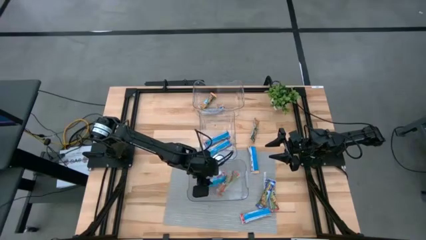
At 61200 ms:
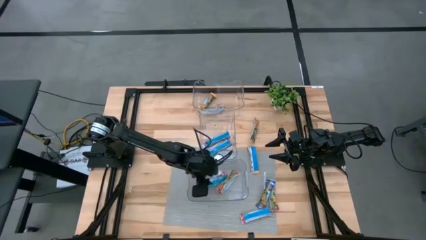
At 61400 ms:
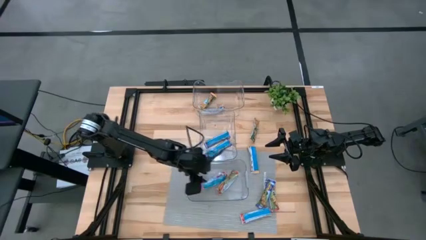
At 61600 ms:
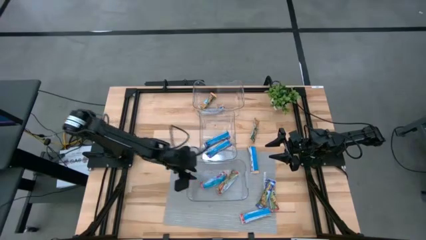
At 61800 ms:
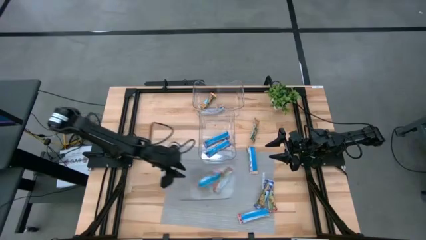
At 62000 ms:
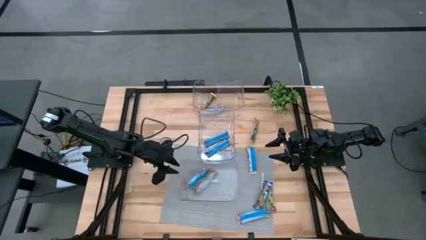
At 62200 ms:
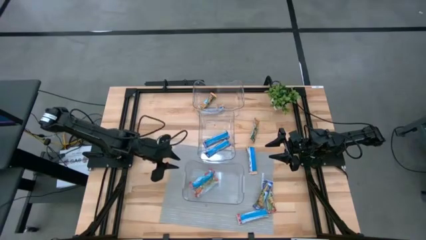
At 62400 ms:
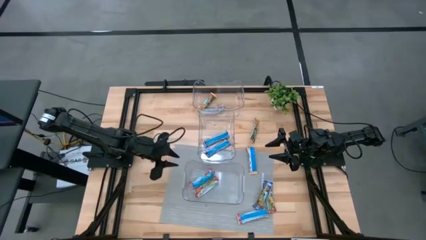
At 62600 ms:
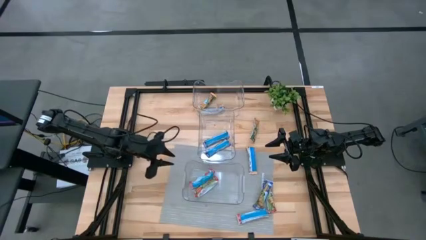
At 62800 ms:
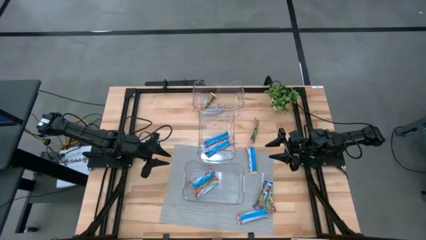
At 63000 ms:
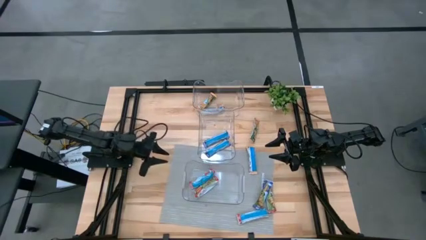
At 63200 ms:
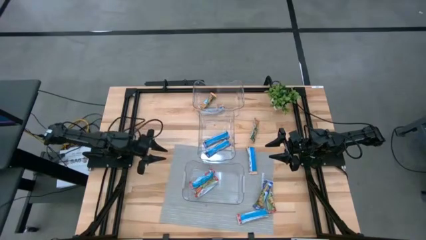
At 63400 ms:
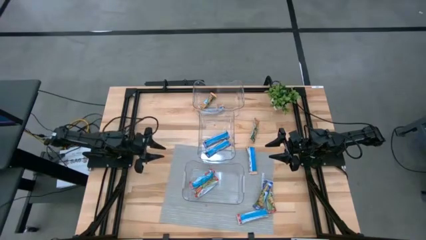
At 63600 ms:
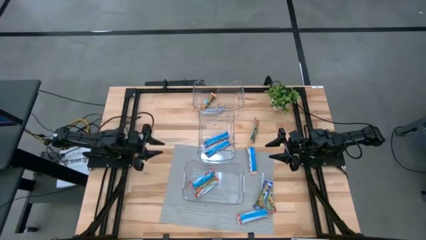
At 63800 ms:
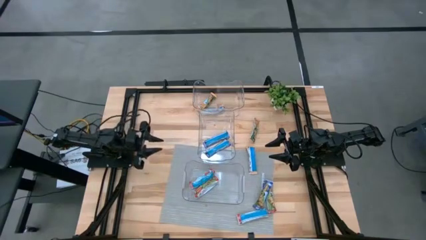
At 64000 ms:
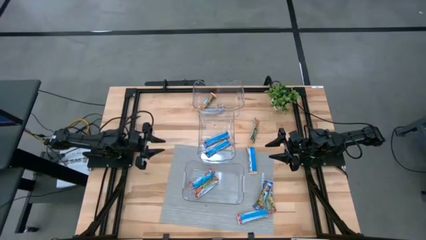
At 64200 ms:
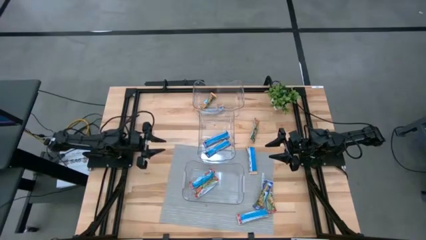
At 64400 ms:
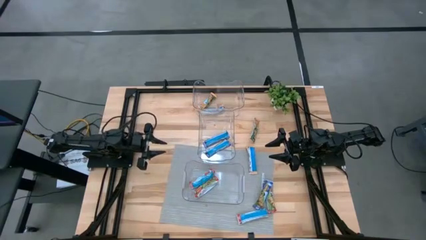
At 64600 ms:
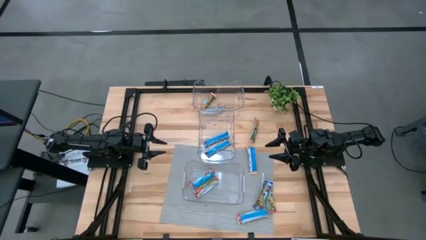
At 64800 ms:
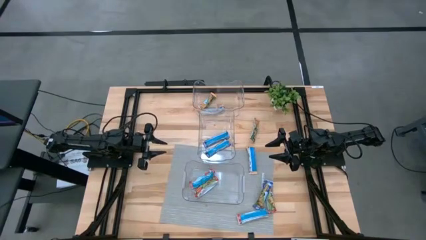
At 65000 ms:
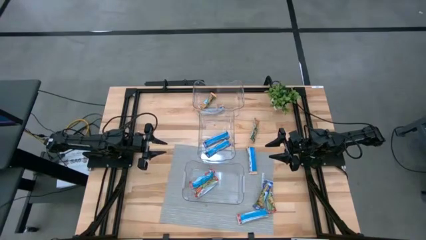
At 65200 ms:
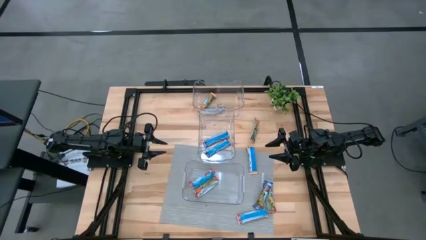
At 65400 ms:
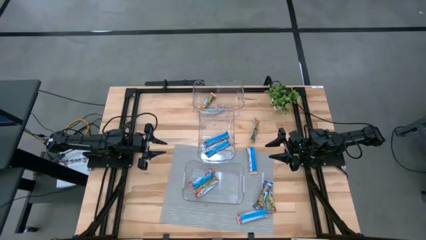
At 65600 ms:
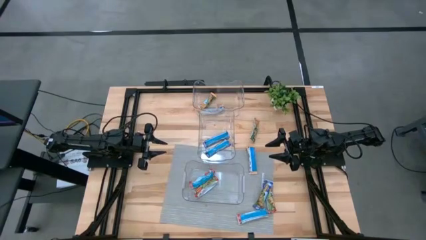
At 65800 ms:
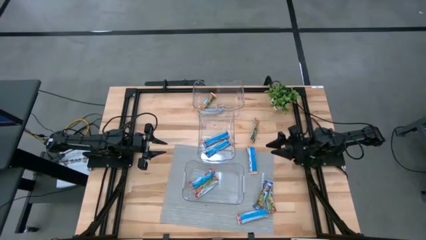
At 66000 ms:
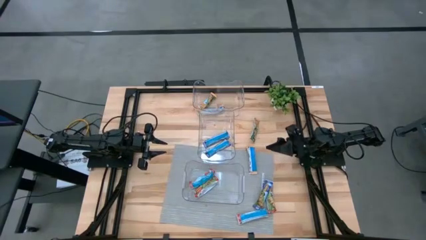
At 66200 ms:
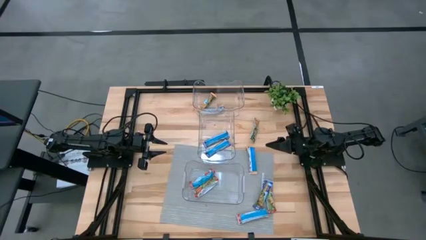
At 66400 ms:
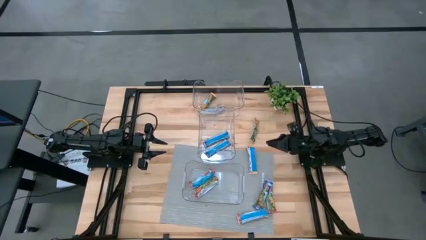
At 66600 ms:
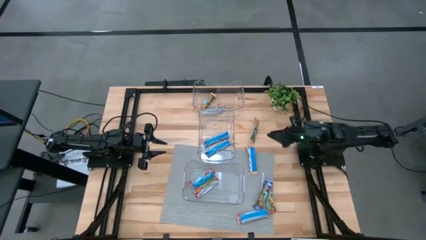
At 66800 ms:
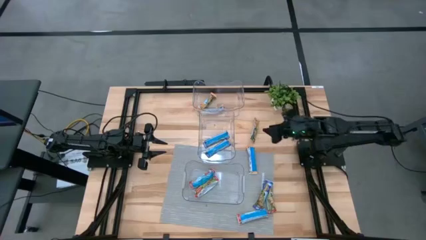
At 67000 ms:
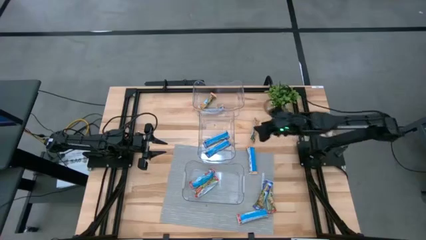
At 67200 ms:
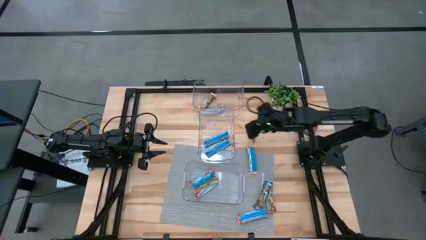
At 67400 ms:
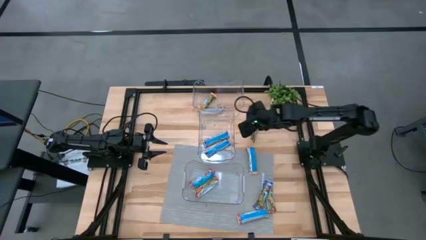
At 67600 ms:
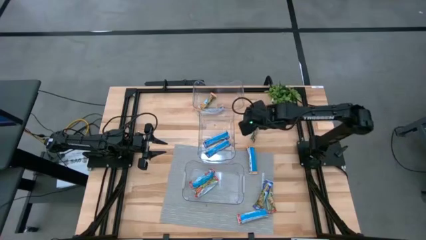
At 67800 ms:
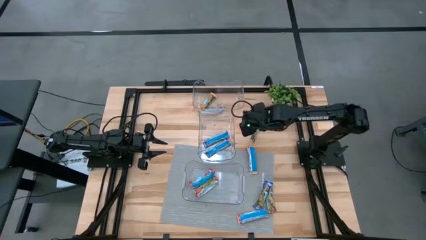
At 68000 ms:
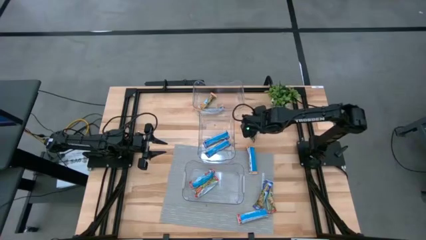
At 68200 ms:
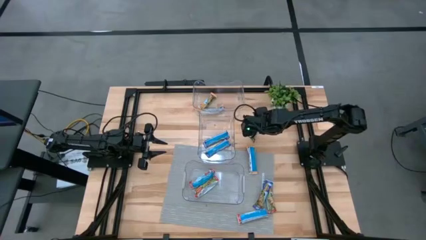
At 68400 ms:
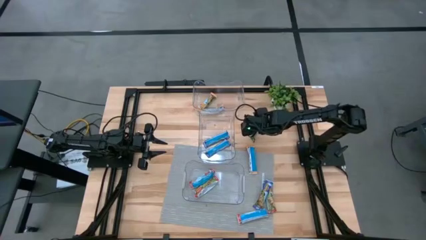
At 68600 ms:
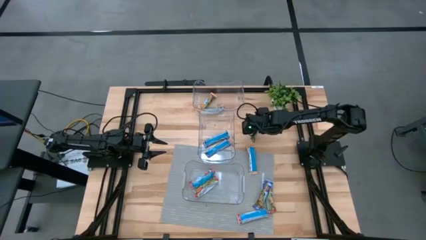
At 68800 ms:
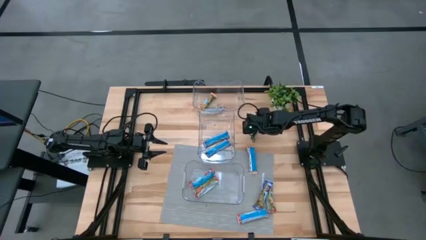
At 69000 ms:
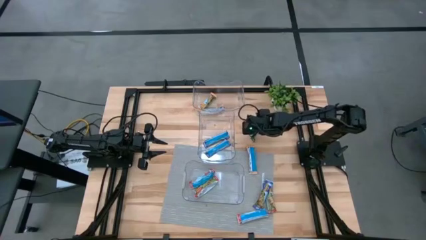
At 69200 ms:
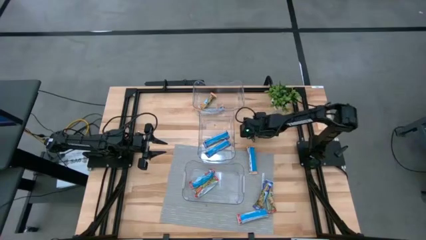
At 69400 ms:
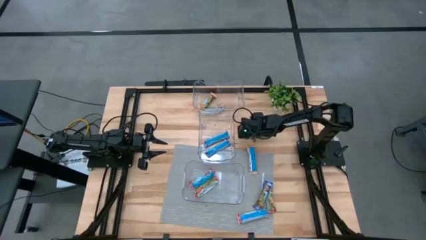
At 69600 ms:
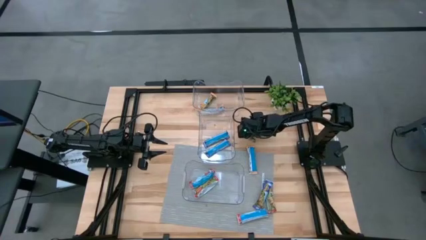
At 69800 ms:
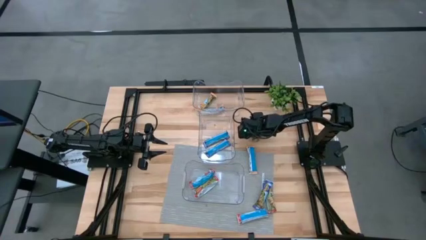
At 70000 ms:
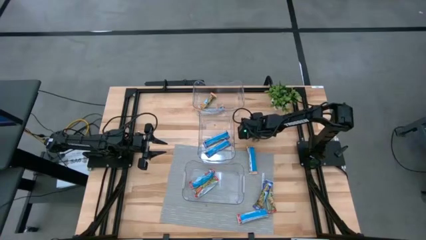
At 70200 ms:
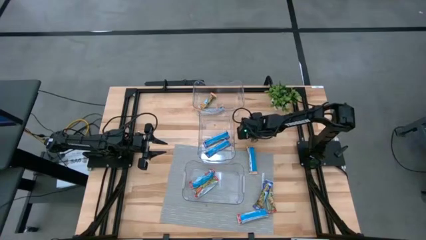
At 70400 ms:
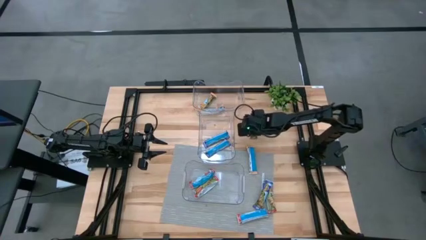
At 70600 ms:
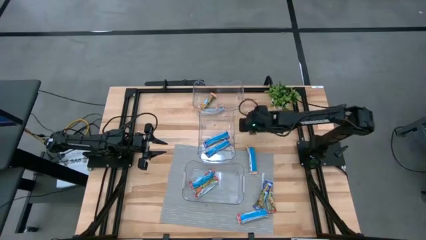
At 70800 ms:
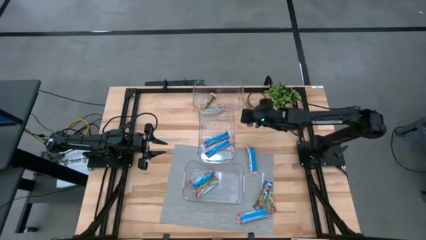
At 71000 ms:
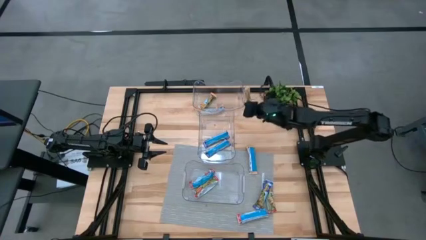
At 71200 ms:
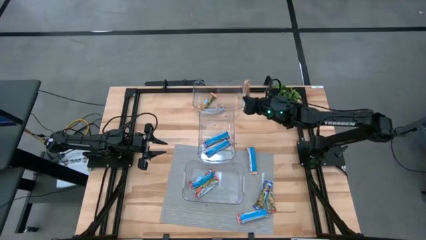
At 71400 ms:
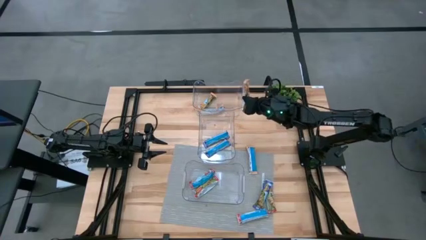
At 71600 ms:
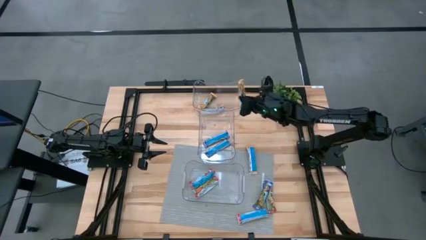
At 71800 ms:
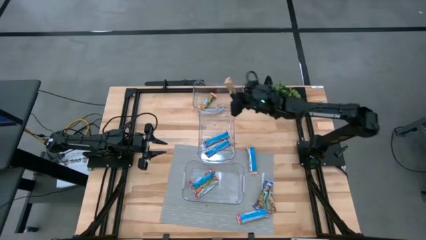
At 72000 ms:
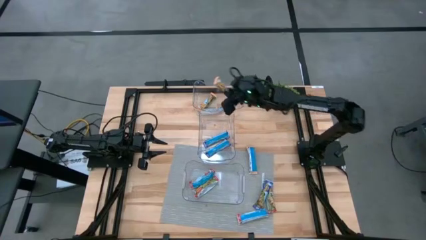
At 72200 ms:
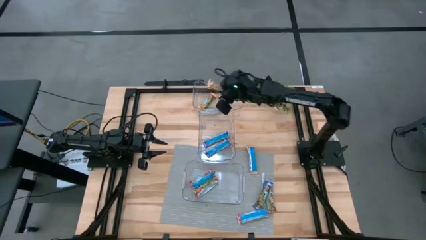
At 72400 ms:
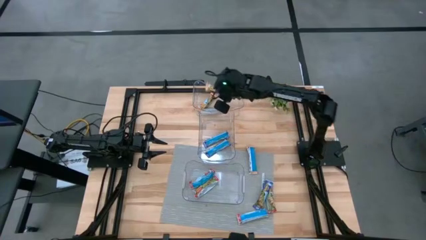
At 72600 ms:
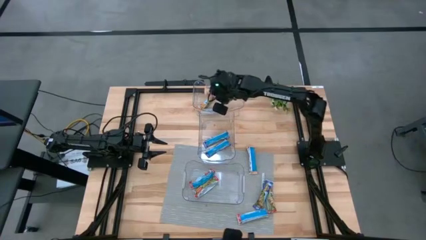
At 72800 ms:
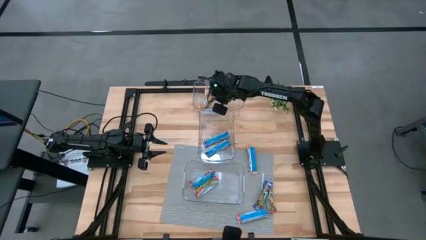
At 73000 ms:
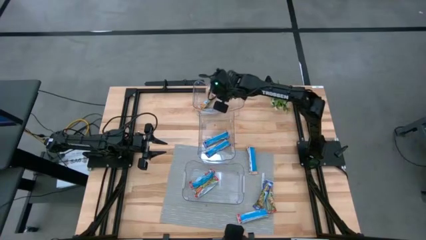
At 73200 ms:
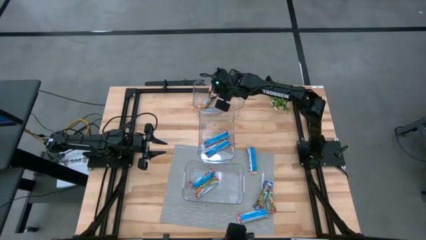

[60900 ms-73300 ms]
Task: Pick and place Granola Bars by type
Put the yellow granola bar into the top transparent bin

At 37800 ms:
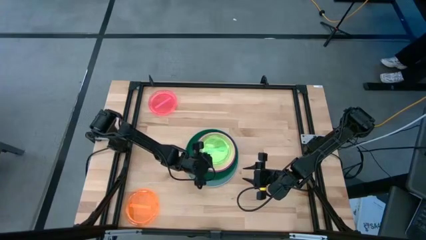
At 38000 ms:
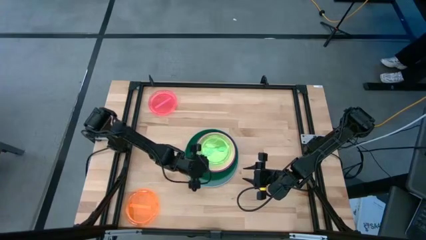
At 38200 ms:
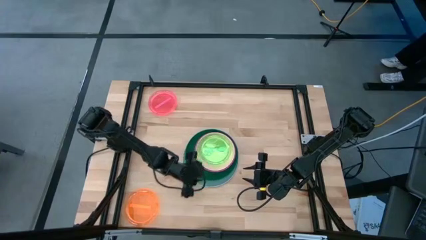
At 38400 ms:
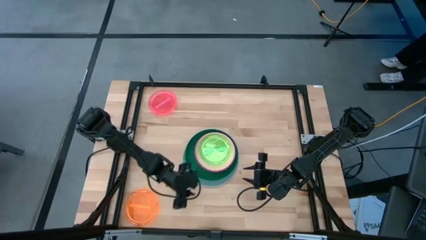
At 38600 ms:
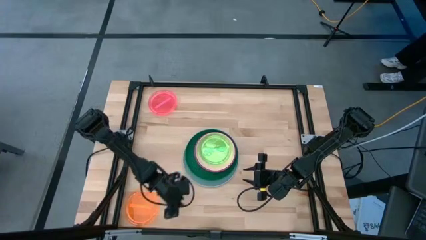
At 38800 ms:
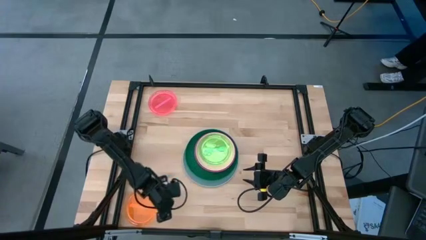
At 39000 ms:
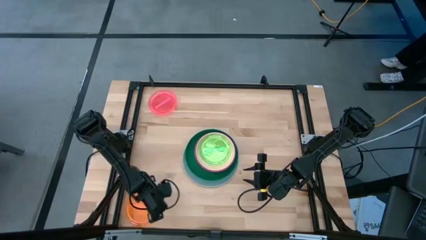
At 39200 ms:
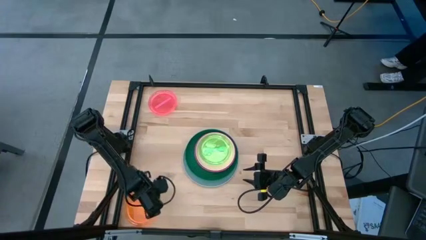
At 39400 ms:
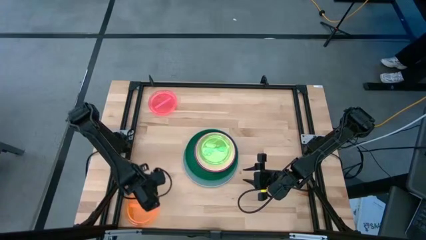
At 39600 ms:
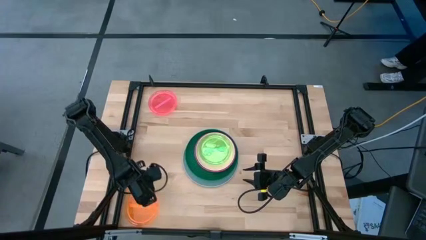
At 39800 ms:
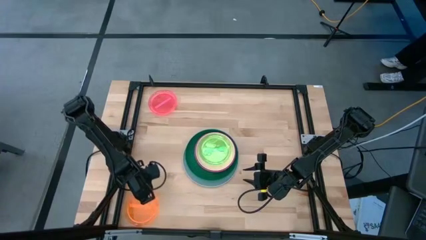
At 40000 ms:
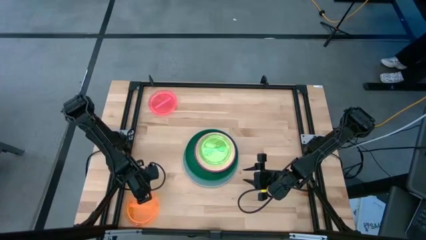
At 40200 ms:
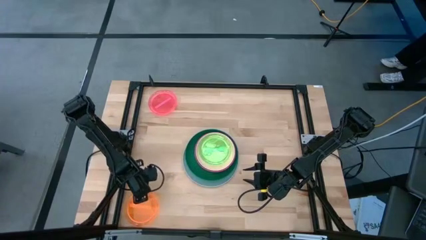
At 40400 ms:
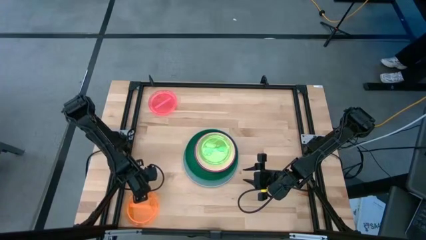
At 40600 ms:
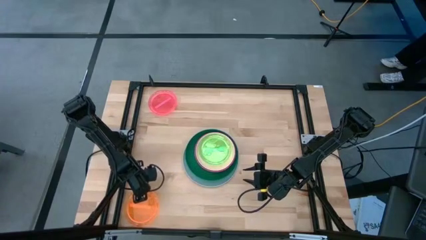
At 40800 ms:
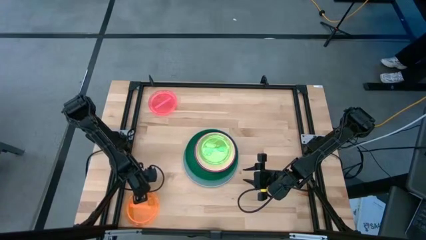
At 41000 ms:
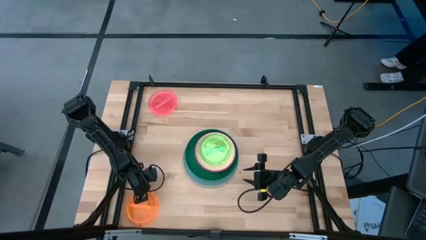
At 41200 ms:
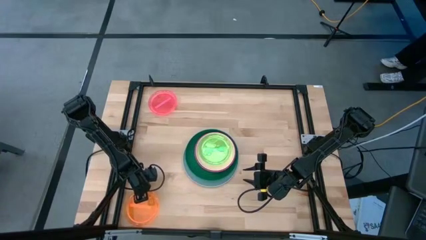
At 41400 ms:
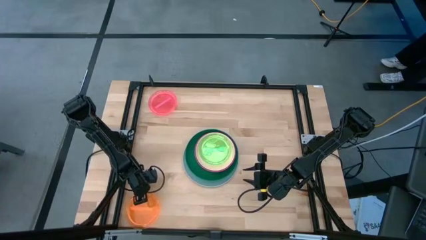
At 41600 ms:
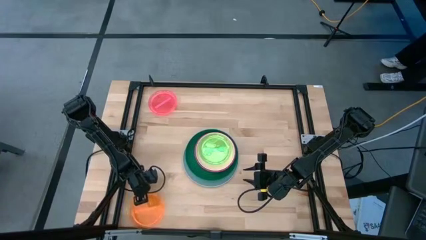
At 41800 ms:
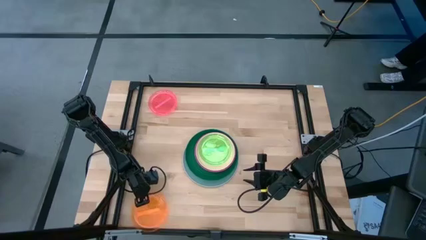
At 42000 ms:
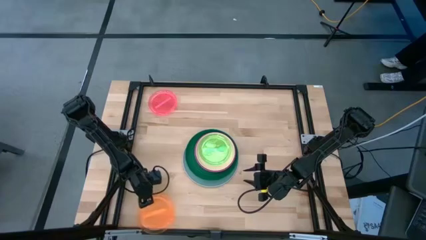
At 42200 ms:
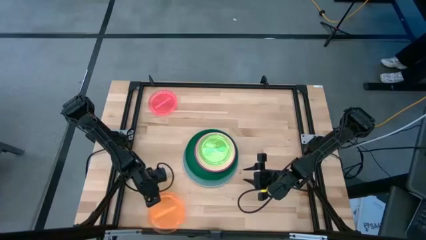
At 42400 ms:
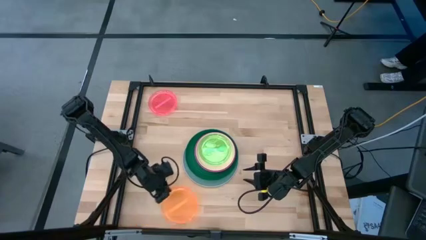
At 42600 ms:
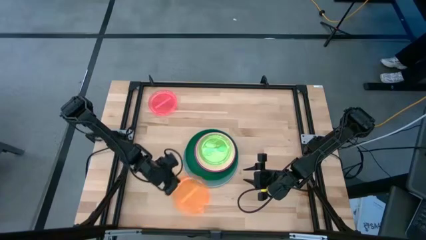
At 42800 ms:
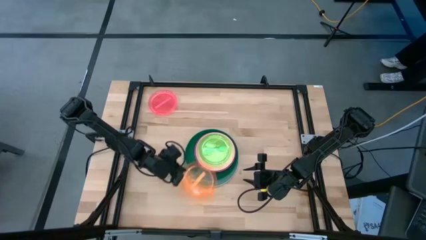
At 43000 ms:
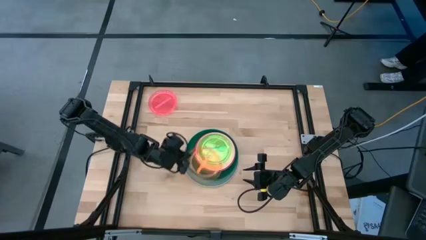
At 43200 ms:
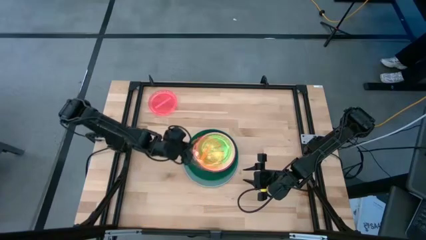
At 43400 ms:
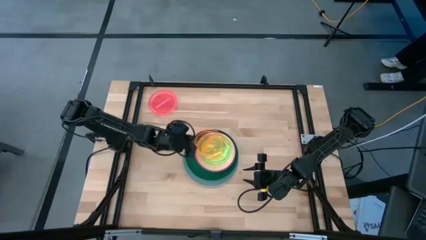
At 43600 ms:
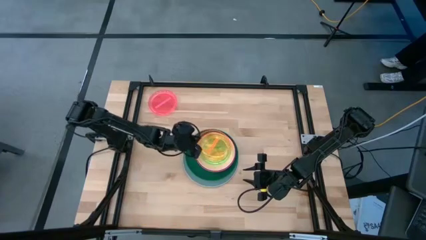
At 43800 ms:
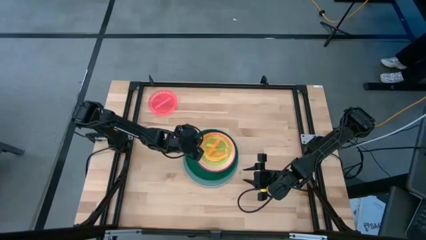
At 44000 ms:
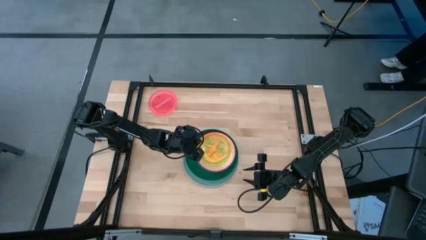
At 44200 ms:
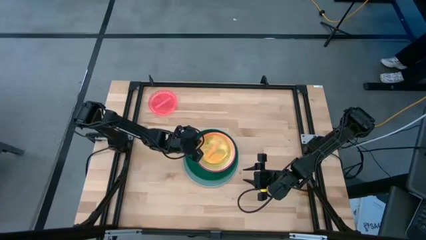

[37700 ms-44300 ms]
Task: Stack plastic plates
Stack the transparent orange plate on top of the transparent green plate
